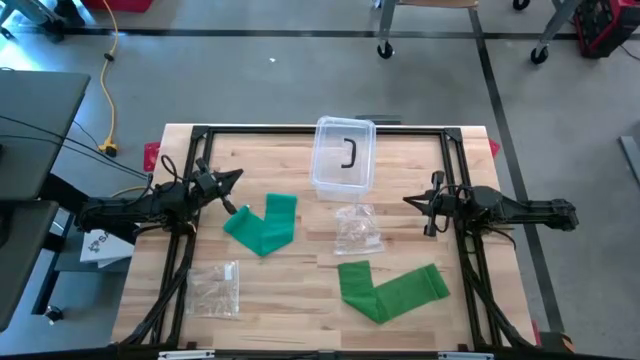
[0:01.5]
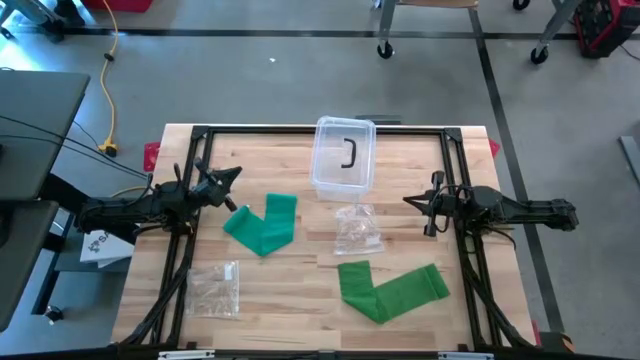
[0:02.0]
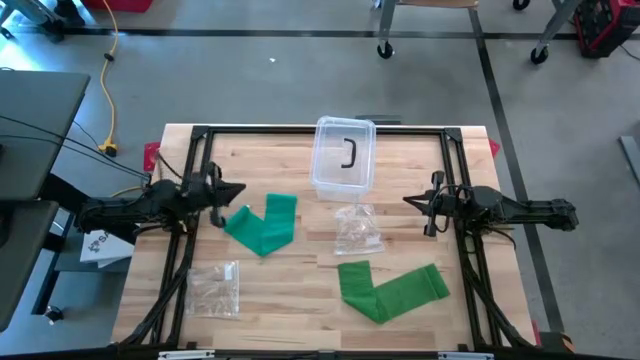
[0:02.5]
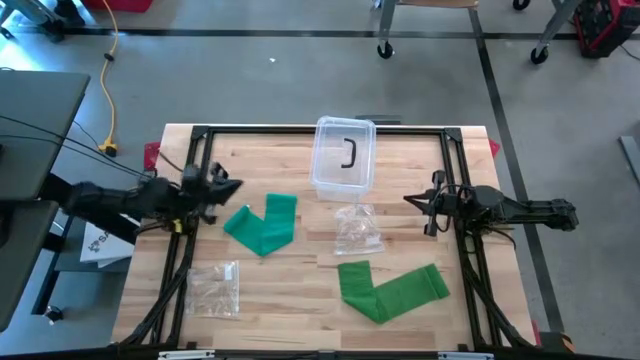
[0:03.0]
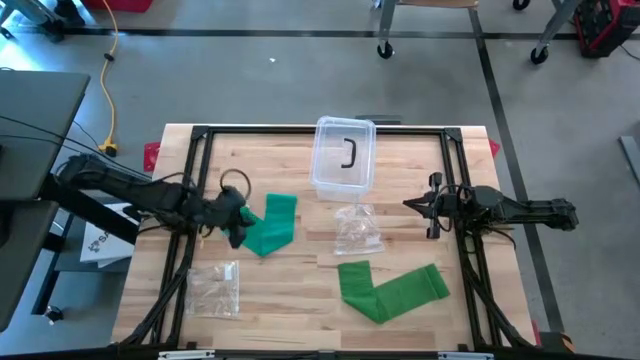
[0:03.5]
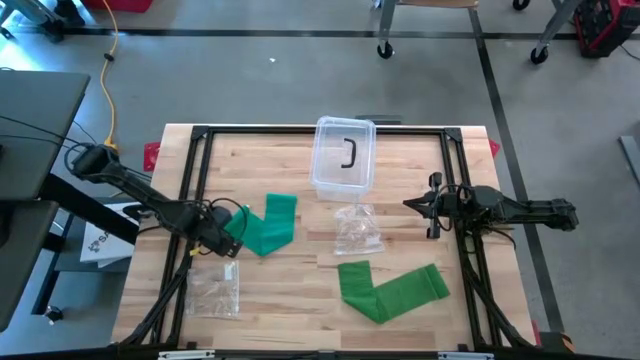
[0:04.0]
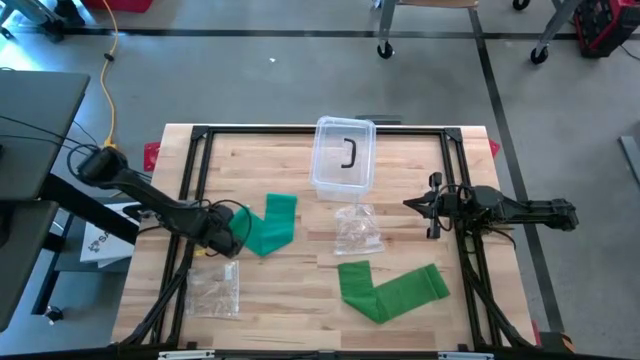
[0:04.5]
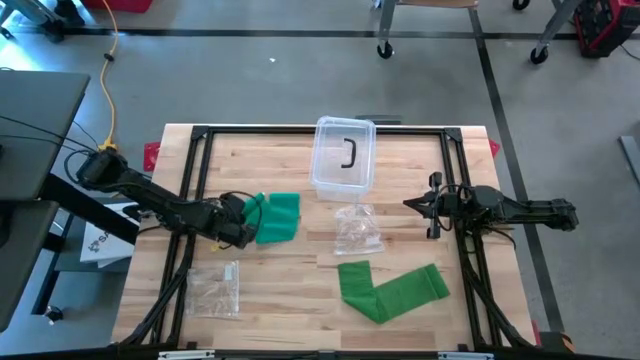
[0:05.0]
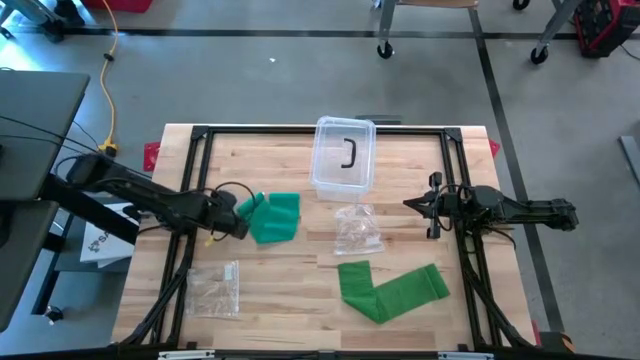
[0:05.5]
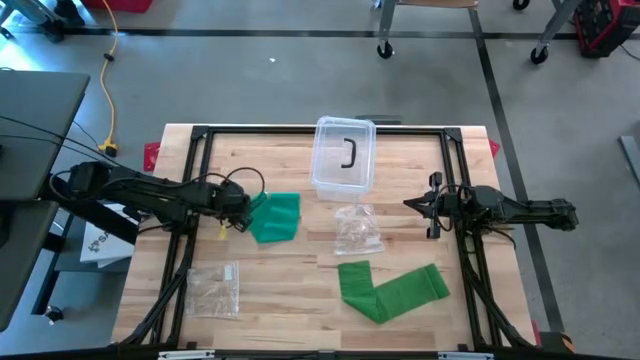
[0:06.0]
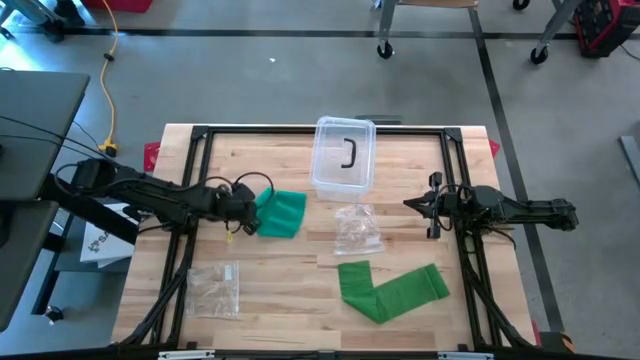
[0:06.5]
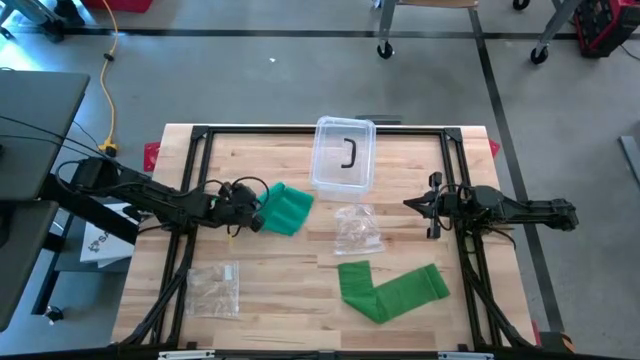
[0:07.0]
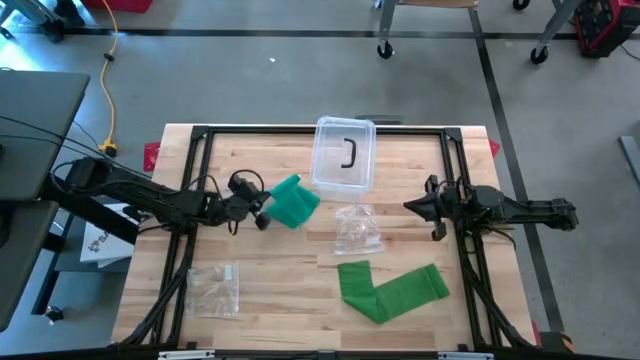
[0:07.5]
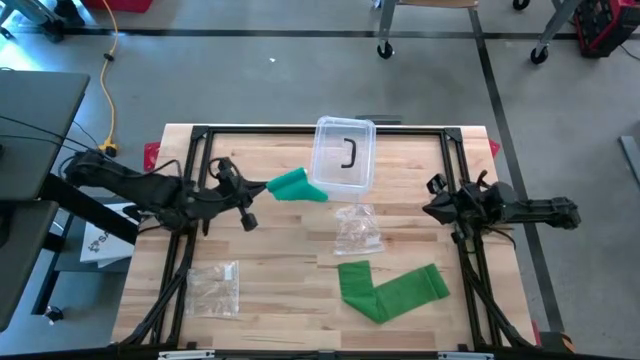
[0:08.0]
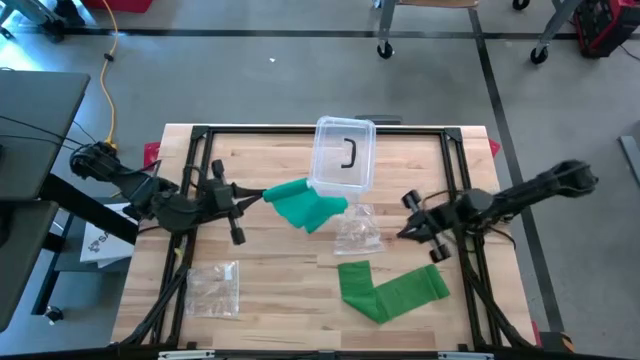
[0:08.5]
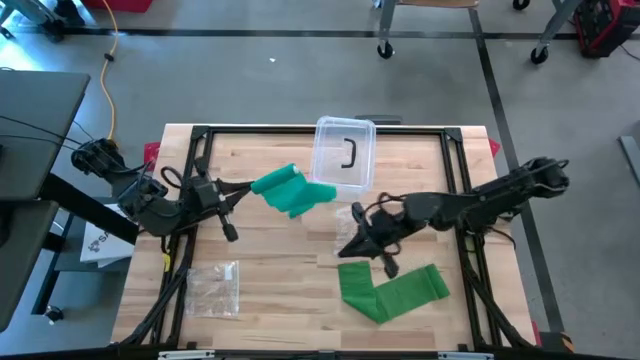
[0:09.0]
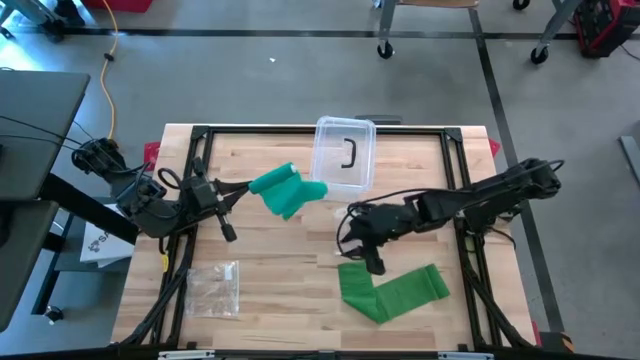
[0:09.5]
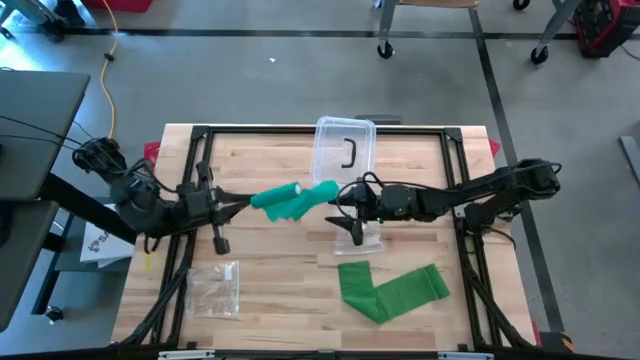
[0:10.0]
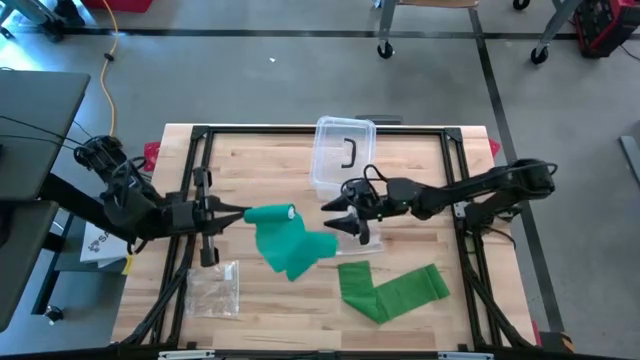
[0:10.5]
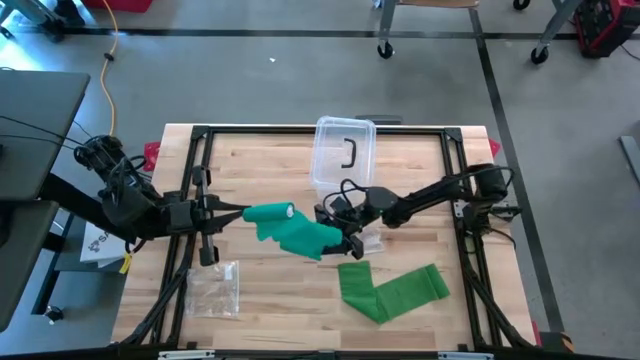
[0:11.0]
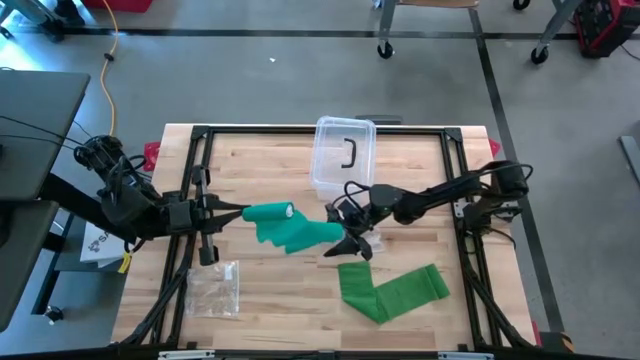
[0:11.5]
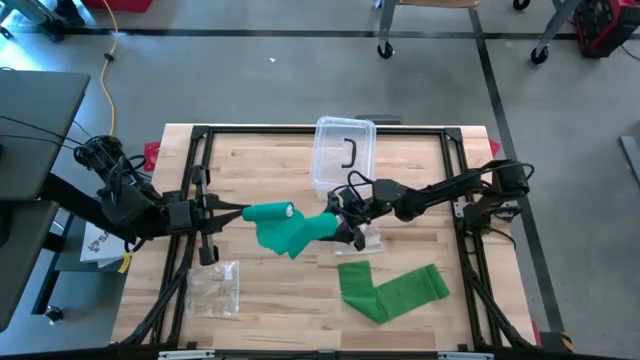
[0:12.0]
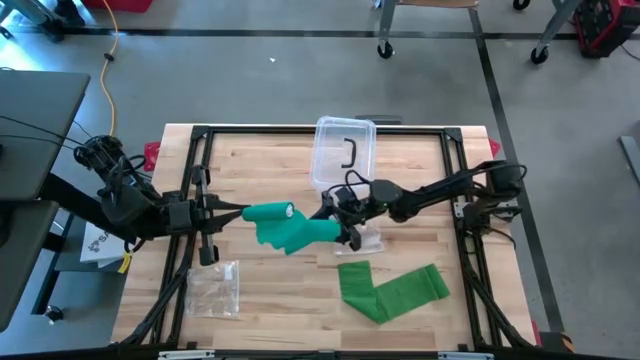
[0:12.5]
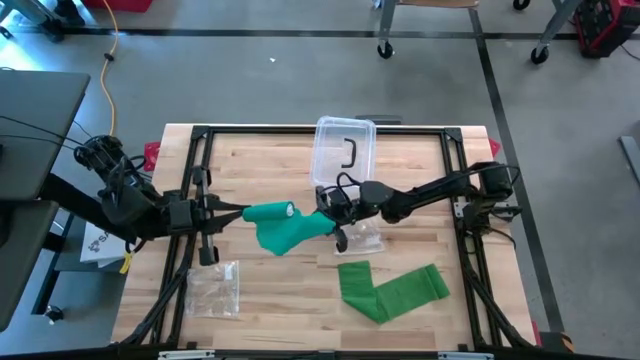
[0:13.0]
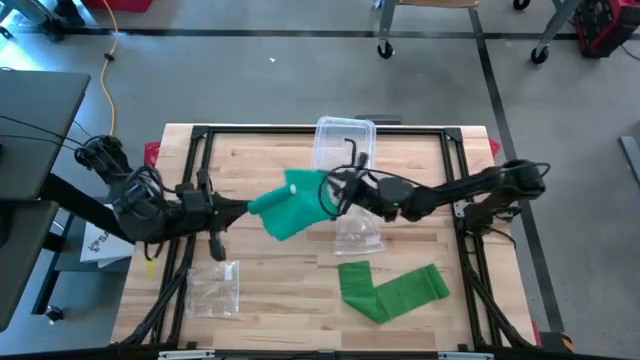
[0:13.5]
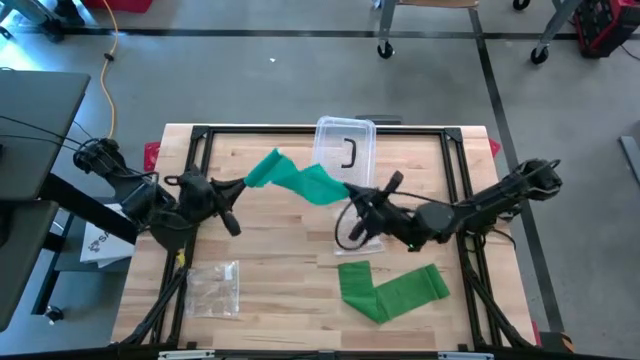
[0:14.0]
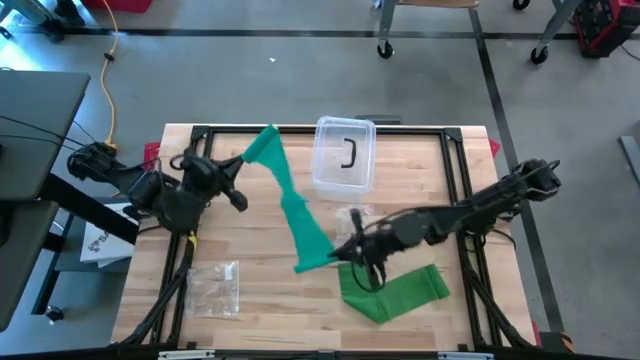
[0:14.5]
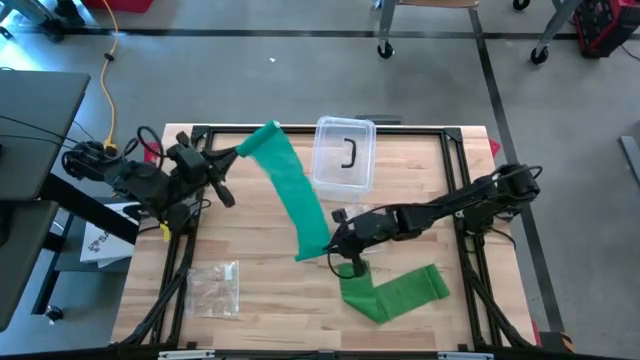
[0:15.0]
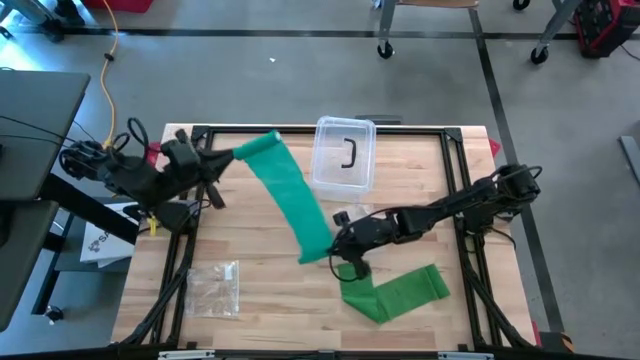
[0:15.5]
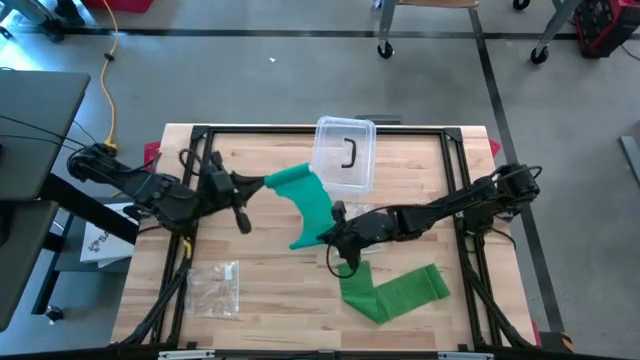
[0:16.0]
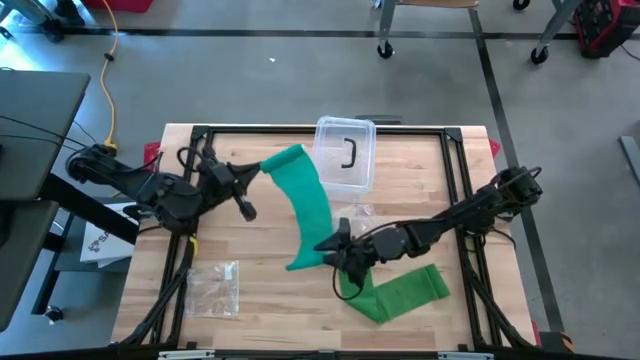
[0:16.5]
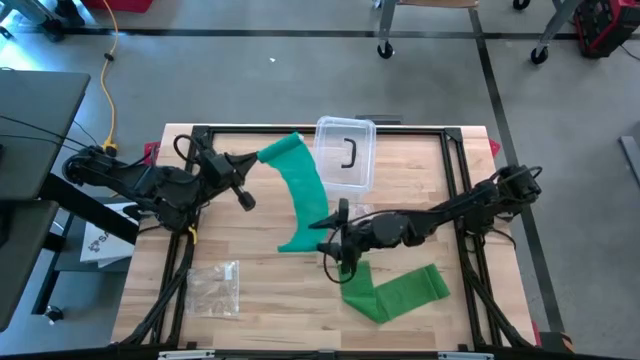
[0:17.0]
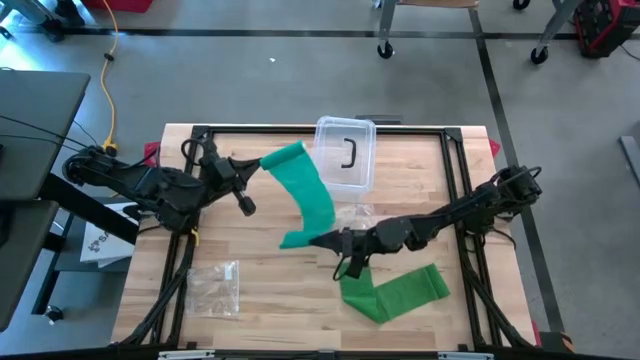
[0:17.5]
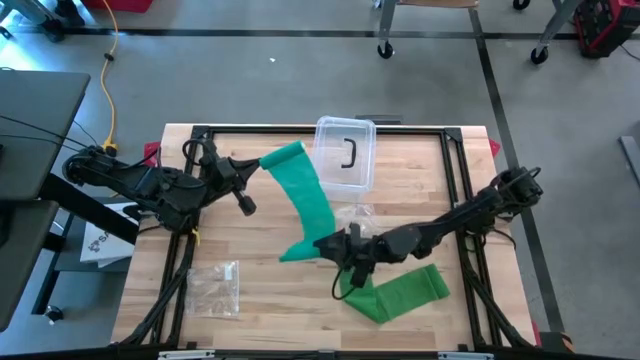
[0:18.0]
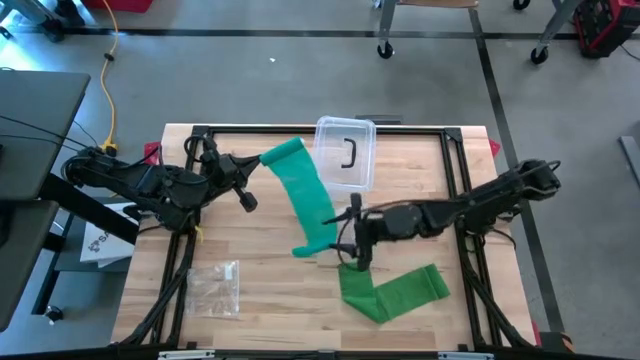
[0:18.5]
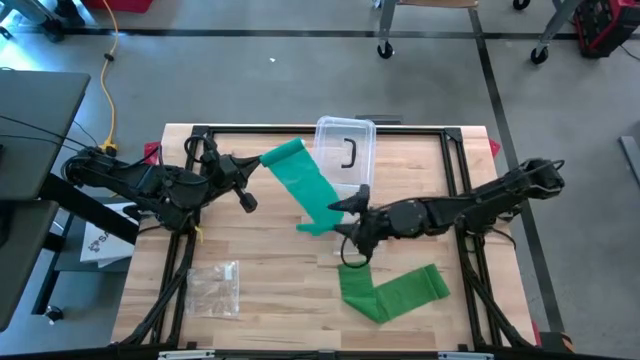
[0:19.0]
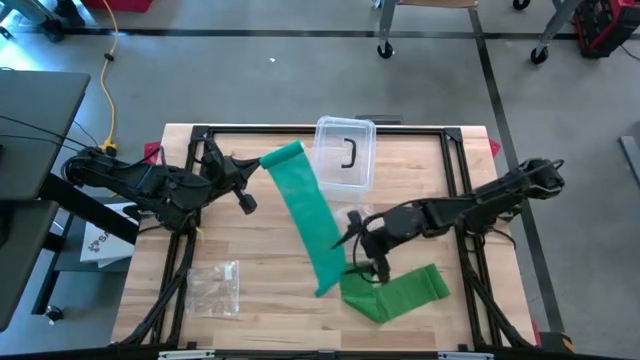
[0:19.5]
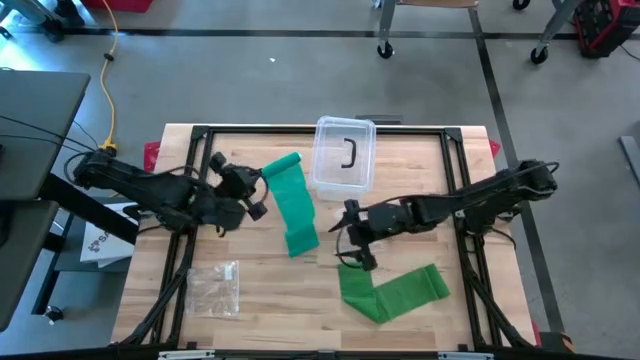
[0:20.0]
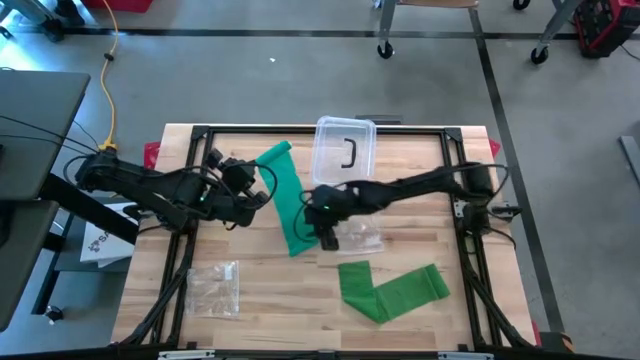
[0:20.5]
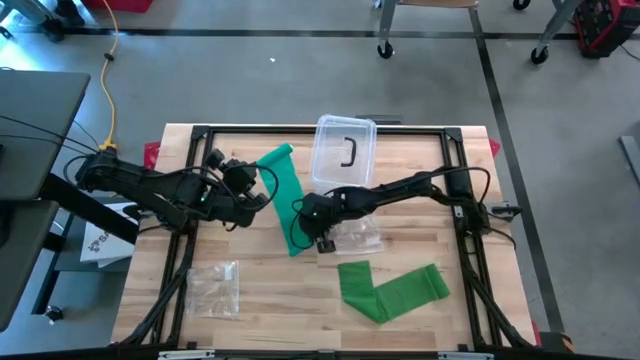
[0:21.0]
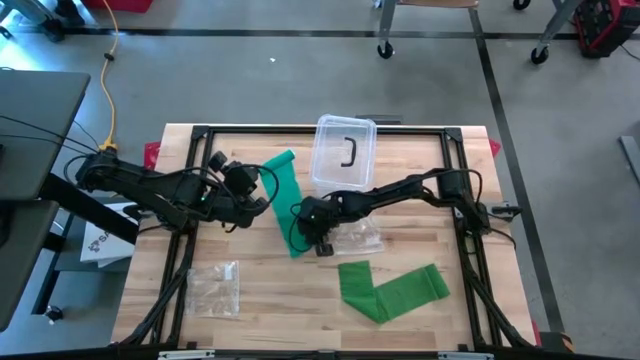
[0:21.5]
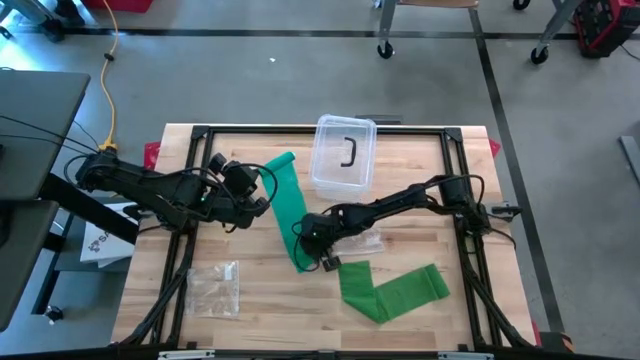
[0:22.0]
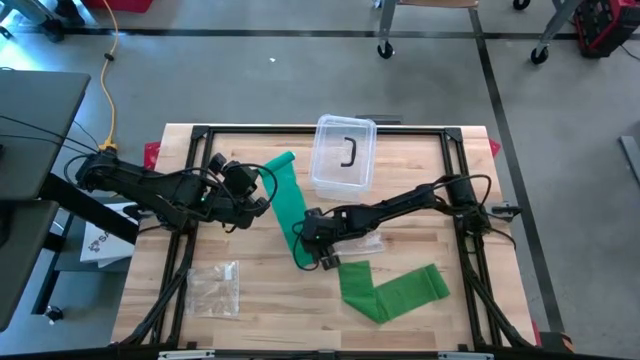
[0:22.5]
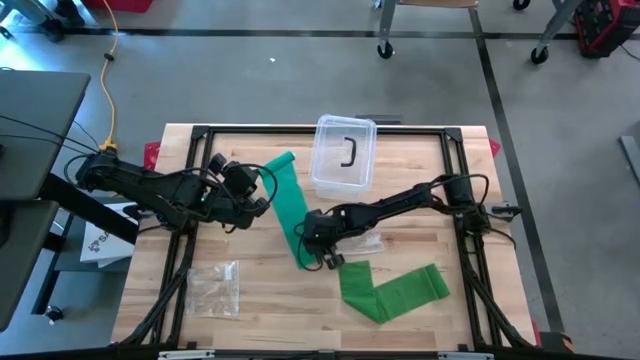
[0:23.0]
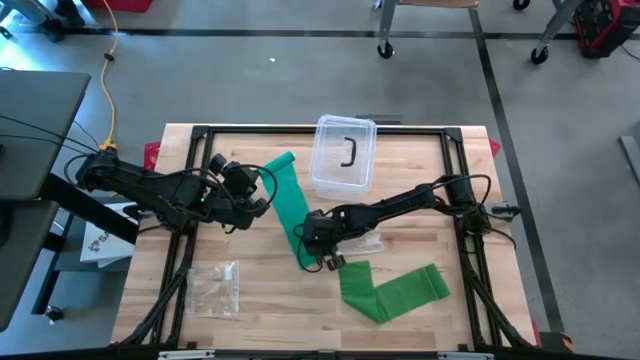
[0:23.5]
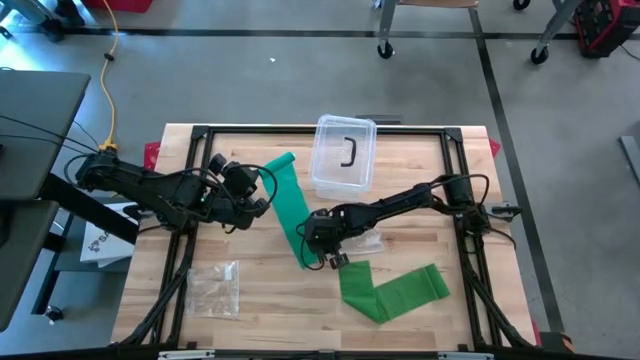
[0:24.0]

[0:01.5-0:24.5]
Task: Roll bandage
Roll the blue bandage
